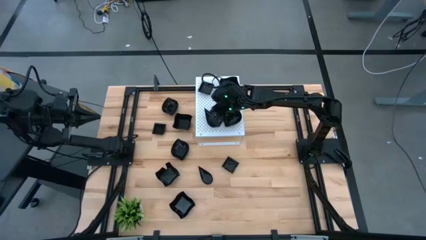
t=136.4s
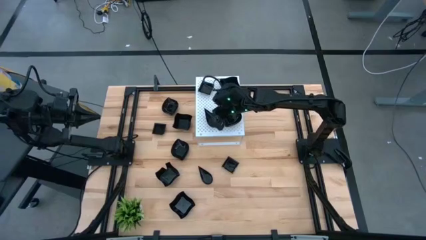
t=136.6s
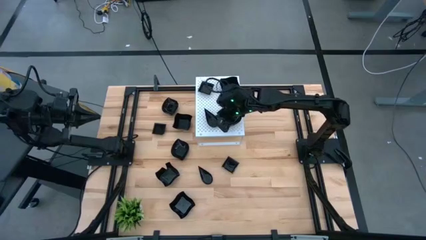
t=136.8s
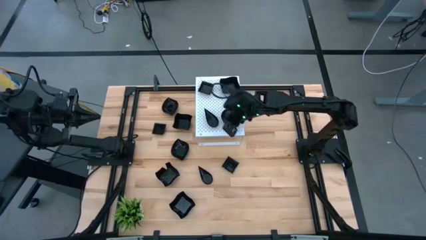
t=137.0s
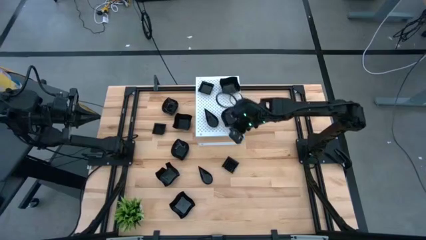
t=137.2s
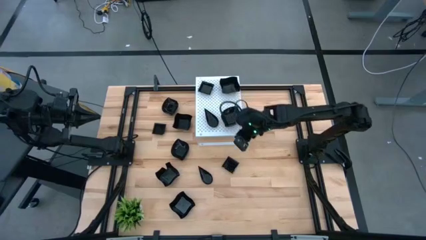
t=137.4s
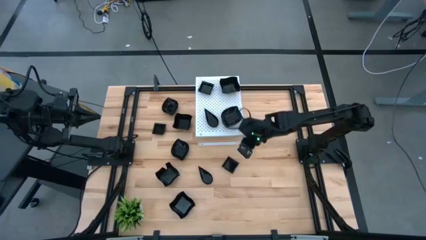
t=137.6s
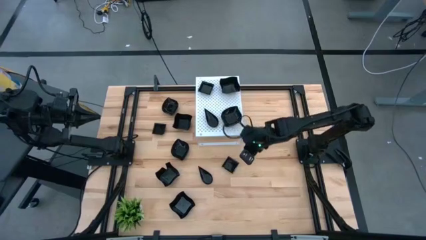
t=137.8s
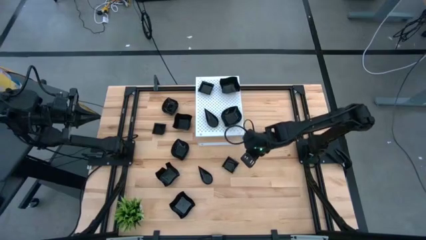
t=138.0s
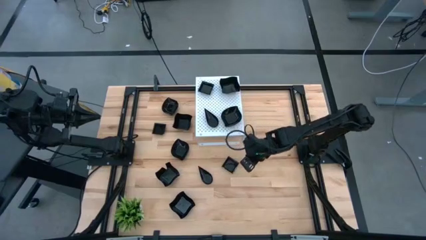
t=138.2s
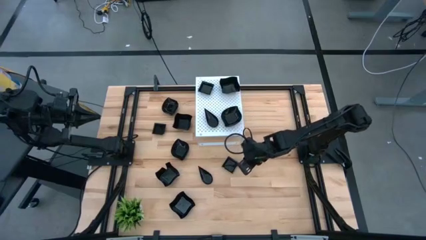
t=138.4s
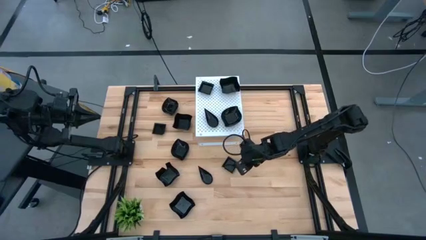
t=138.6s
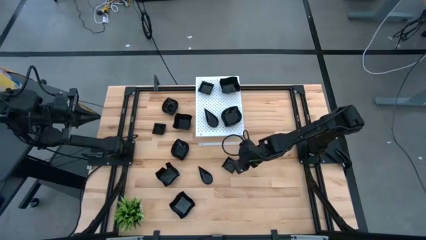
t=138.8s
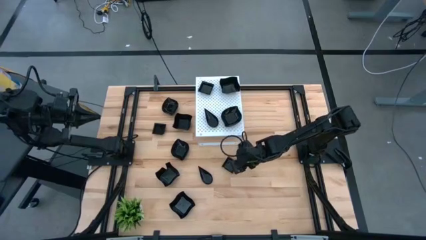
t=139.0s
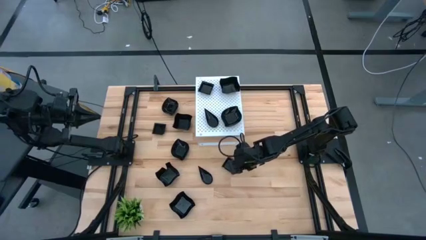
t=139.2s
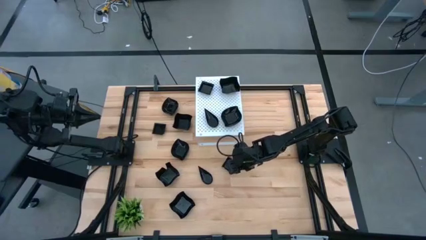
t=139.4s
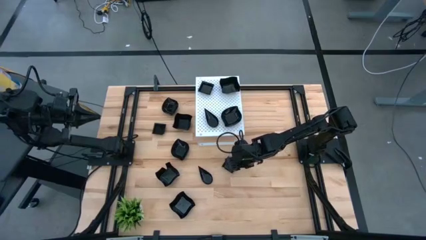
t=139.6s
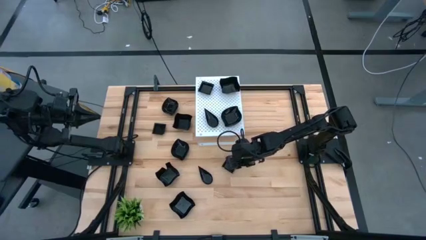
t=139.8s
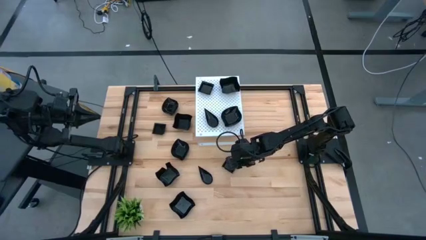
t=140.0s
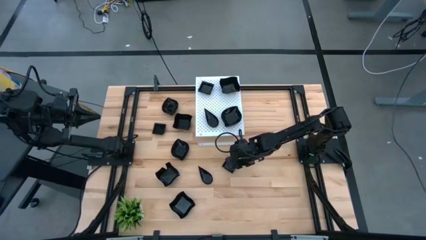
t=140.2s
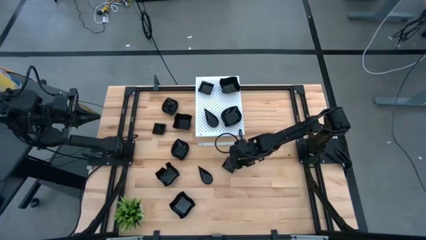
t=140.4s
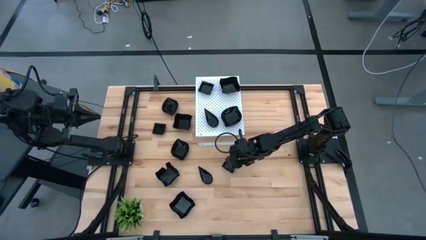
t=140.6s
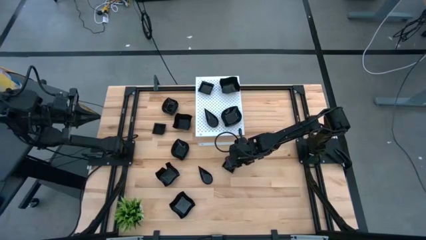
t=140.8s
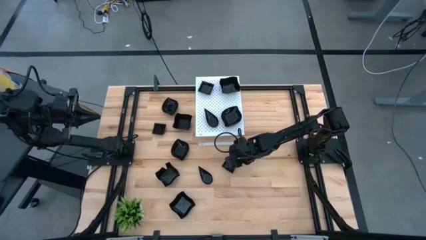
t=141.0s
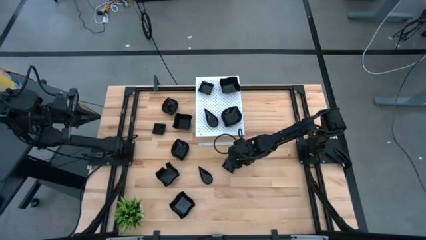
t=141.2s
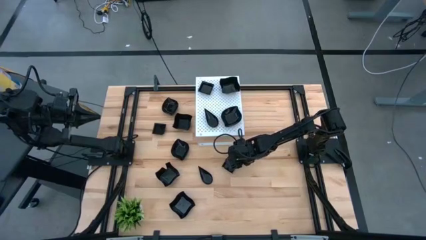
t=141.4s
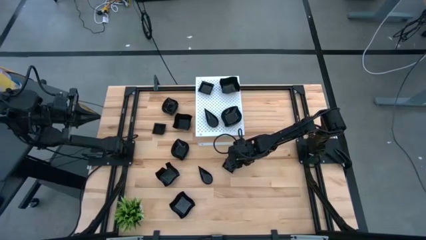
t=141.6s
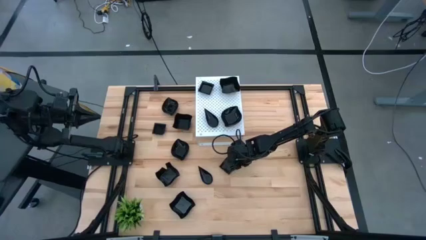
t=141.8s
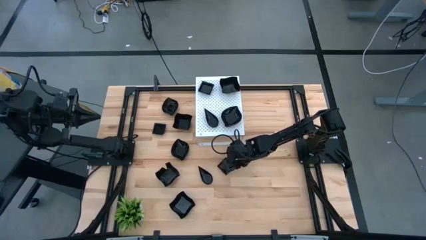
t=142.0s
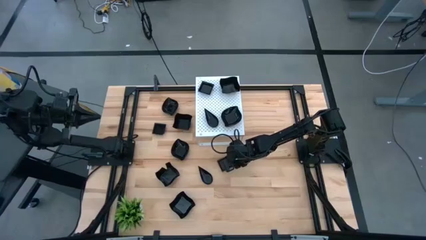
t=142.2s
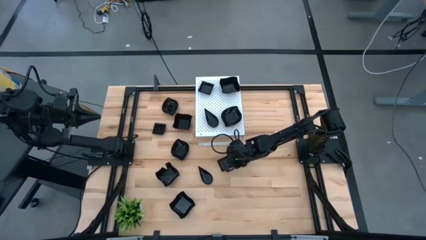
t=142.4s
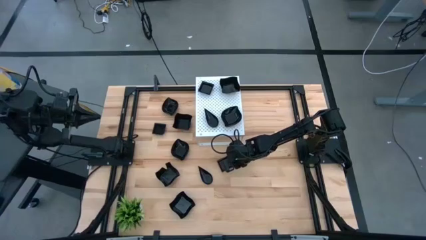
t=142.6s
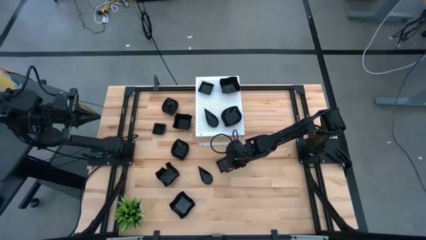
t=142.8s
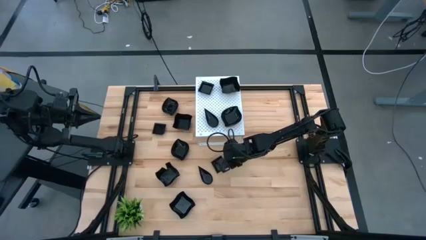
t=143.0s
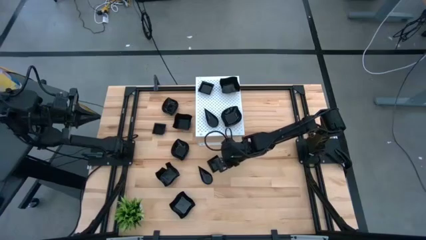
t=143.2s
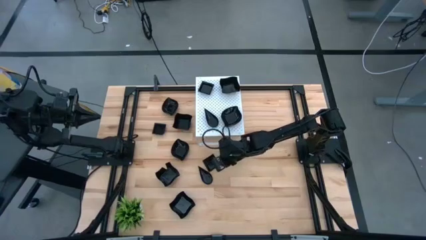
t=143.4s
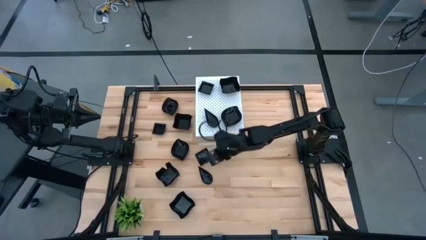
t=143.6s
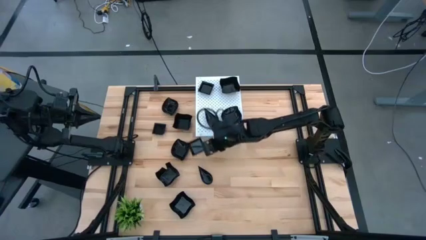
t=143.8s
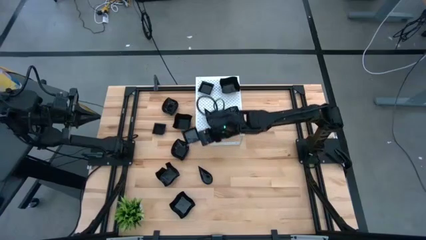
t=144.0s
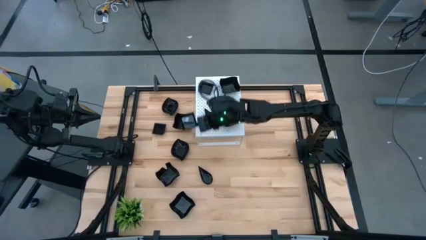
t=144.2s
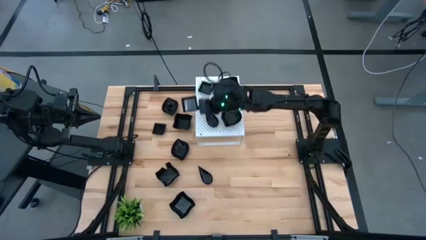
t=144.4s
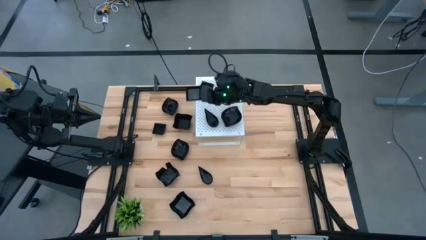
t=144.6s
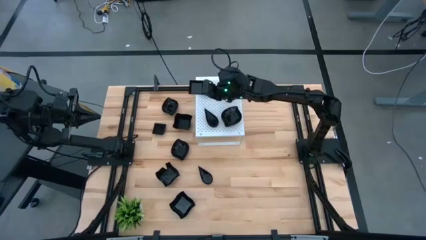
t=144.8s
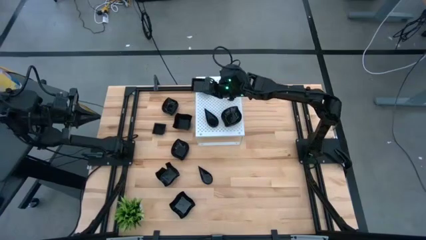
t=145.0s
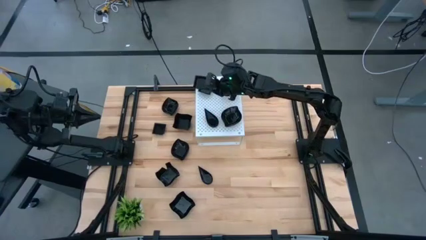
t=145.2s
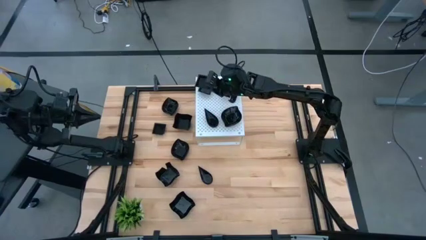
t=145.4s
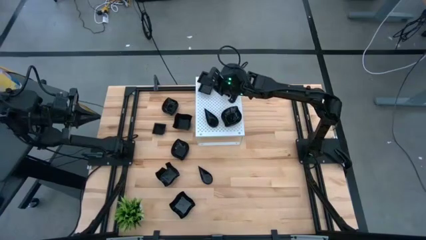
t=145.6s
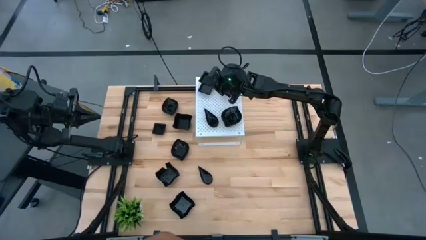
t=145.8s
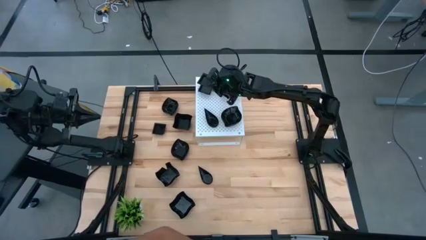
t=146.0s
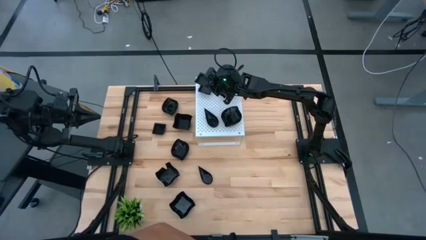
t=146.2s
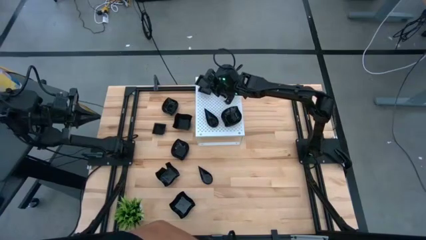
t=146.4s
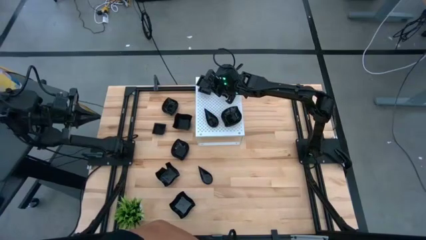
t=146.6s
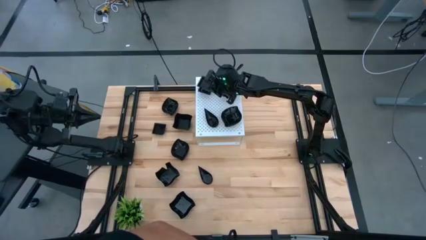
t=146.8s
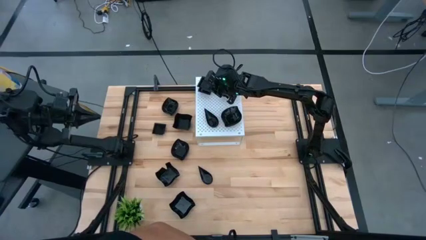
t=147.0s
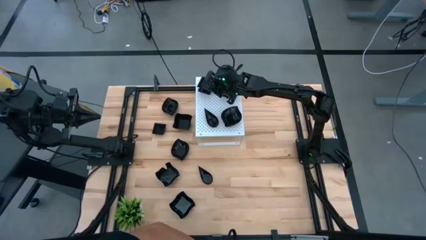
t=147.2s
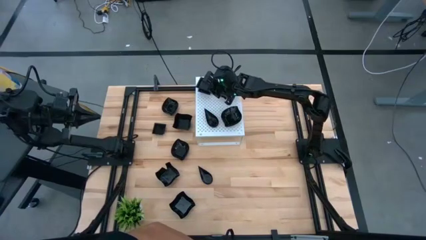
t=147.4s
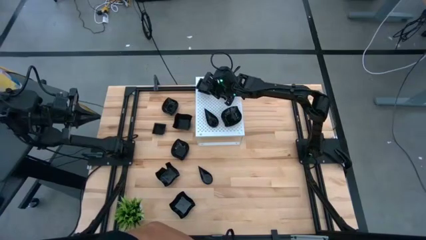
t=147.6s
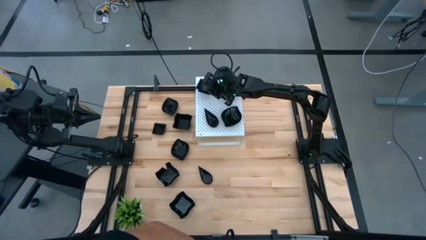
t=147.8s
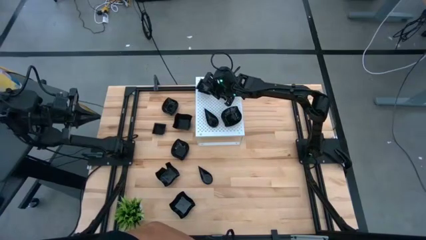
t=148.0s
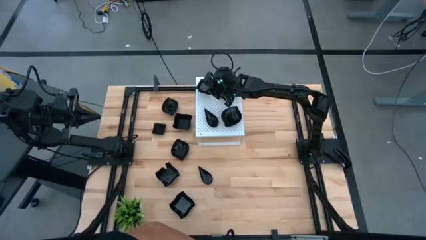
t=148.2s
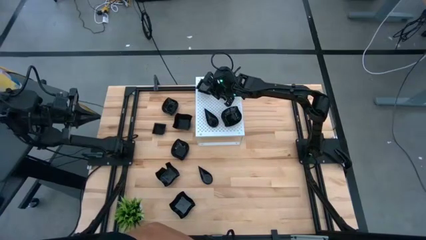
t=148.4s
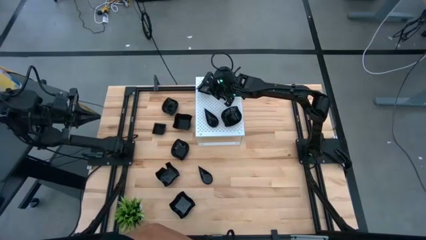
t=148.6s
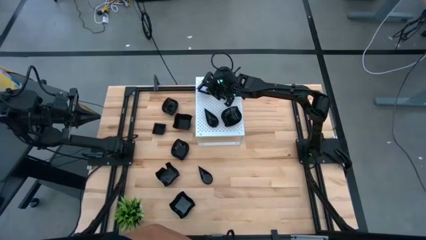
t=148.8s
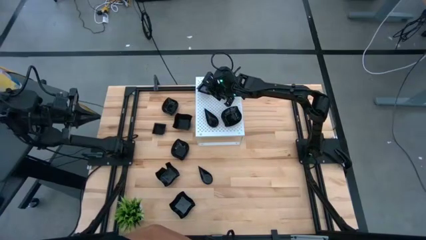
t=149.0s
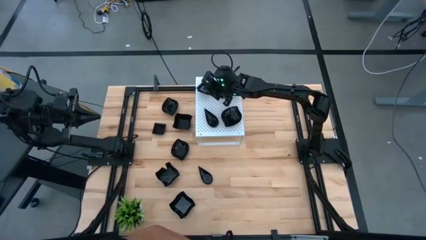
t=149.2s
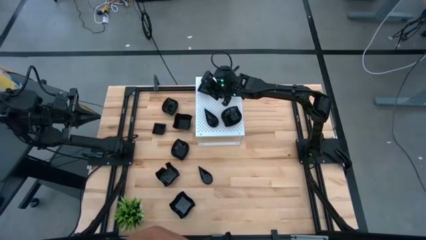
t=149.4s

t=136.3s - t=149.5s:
Task: Pick & Place Mini shaped plates
Stack the square plate on top of the square plate on the shelf
